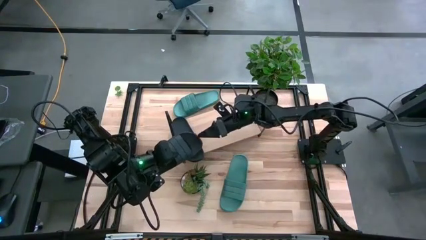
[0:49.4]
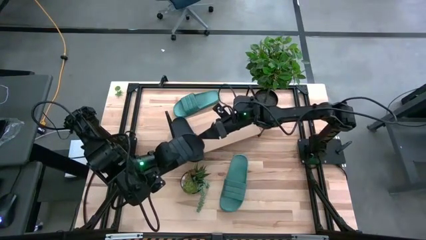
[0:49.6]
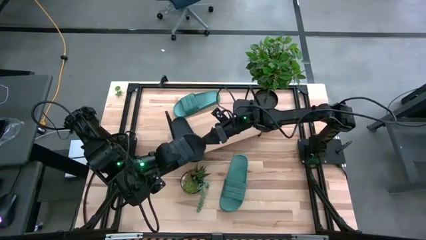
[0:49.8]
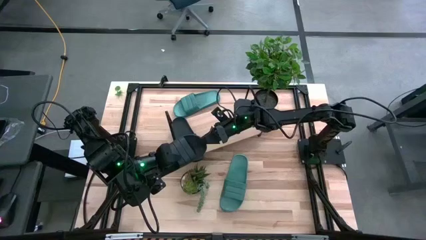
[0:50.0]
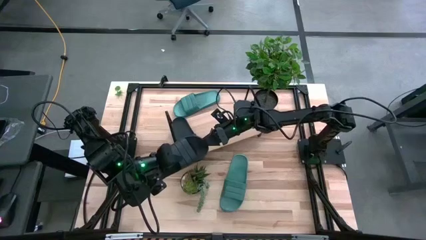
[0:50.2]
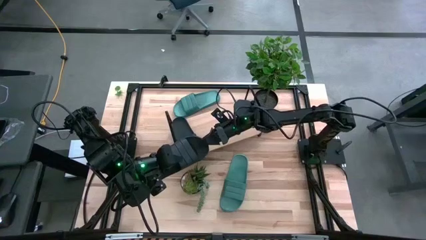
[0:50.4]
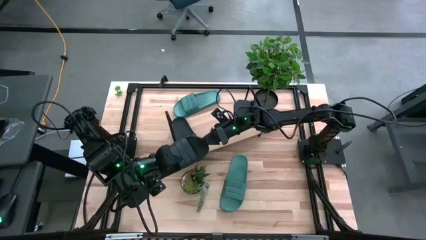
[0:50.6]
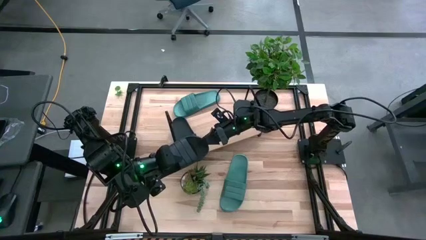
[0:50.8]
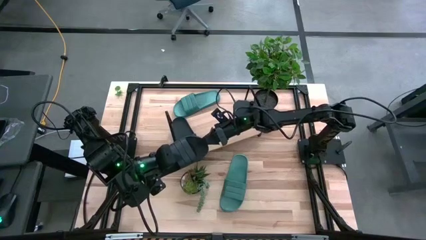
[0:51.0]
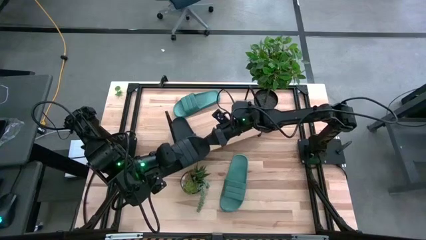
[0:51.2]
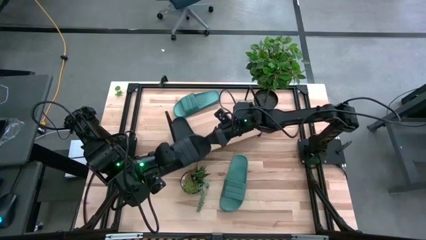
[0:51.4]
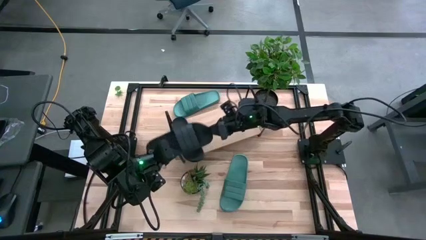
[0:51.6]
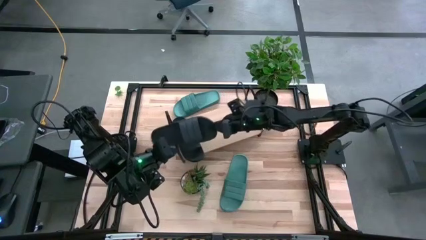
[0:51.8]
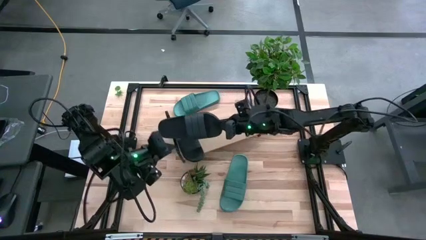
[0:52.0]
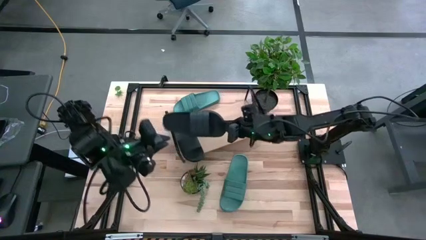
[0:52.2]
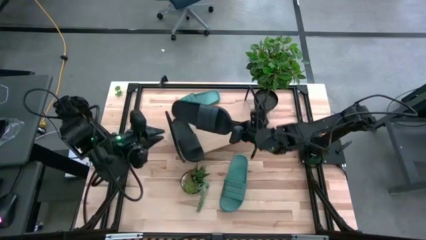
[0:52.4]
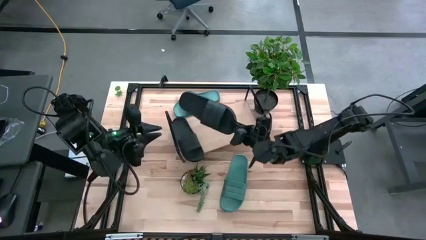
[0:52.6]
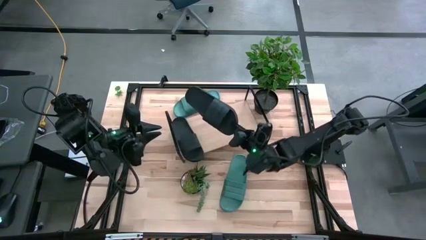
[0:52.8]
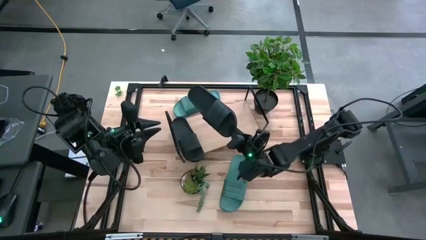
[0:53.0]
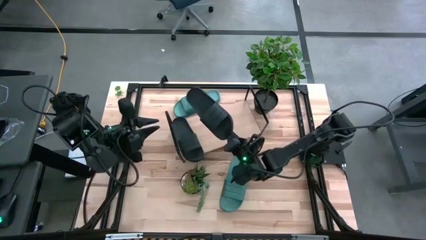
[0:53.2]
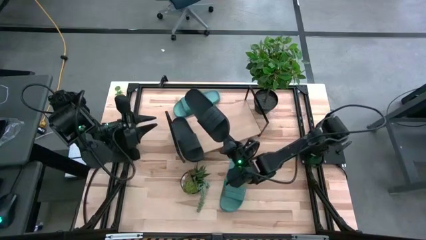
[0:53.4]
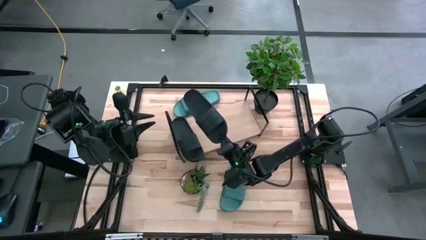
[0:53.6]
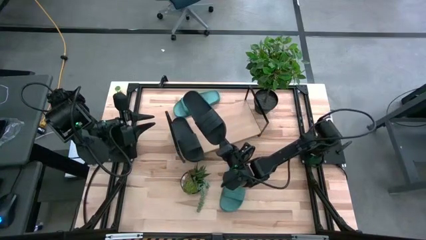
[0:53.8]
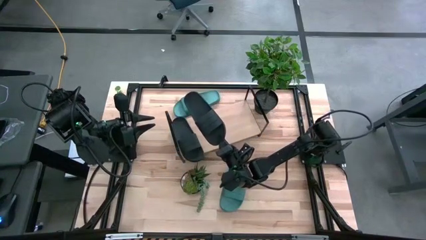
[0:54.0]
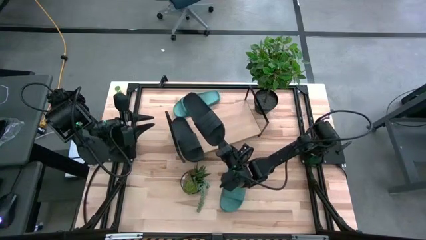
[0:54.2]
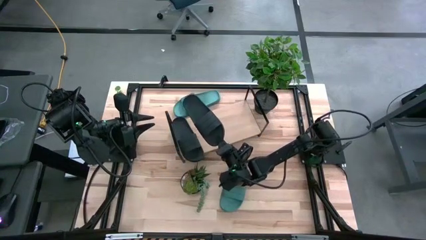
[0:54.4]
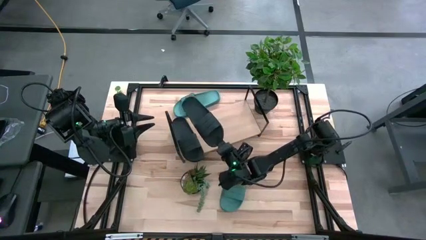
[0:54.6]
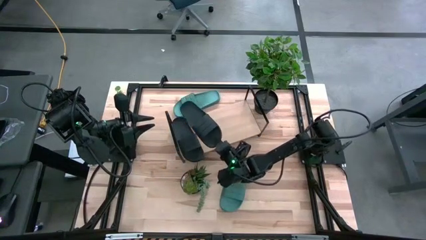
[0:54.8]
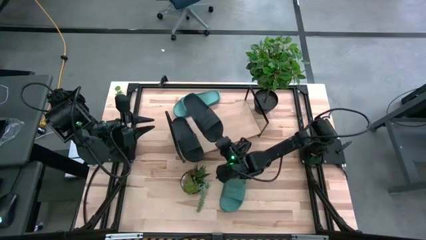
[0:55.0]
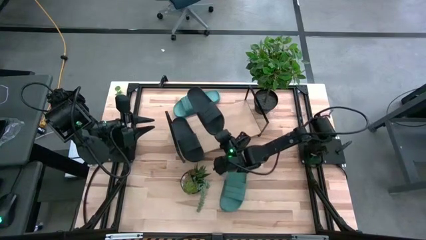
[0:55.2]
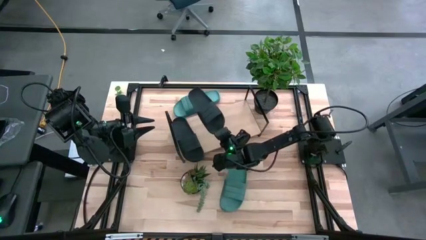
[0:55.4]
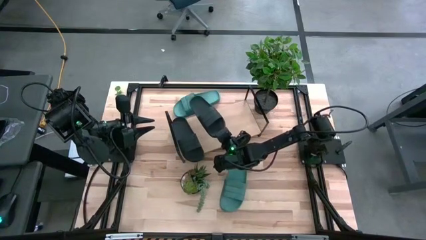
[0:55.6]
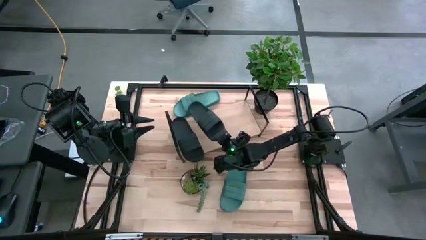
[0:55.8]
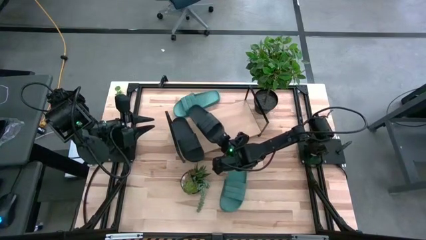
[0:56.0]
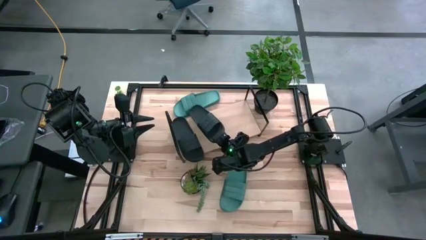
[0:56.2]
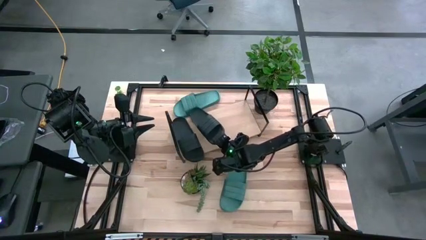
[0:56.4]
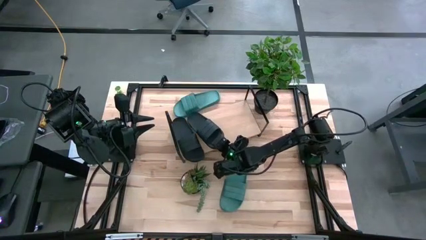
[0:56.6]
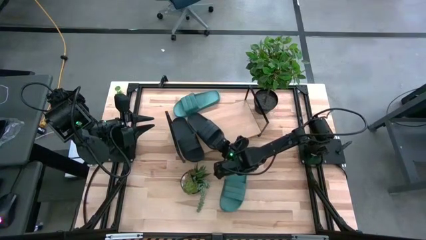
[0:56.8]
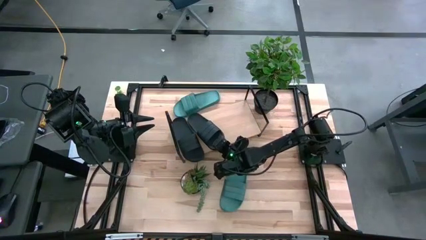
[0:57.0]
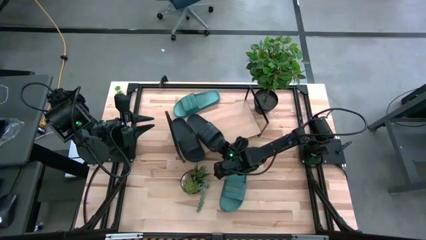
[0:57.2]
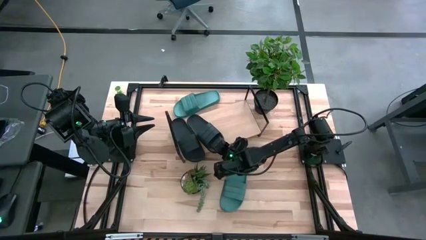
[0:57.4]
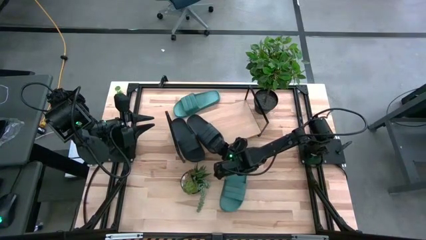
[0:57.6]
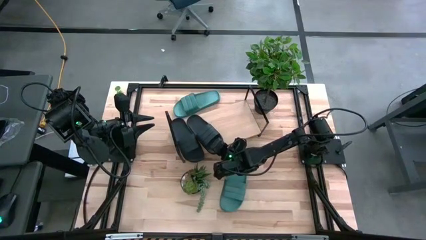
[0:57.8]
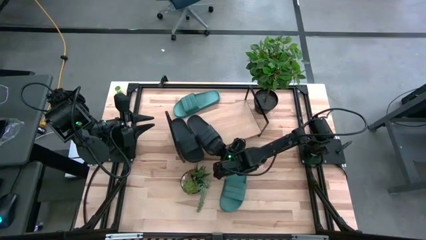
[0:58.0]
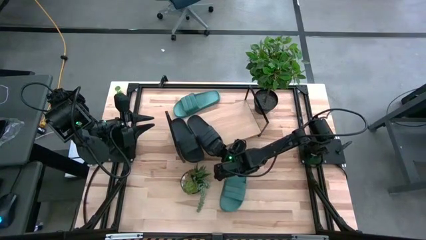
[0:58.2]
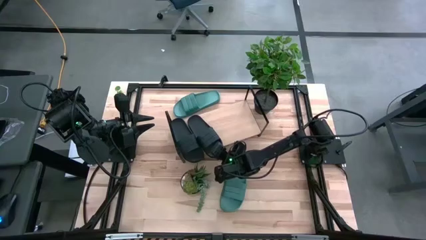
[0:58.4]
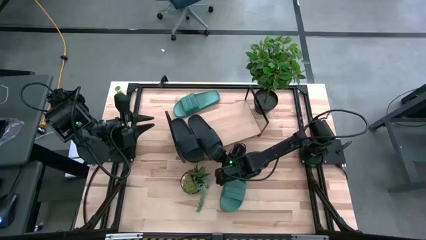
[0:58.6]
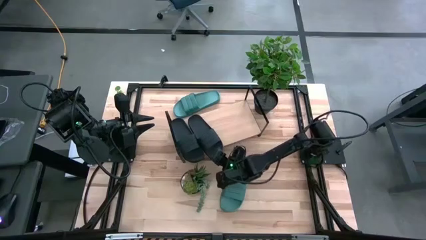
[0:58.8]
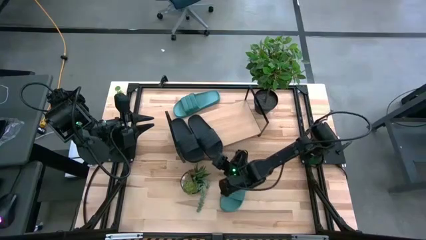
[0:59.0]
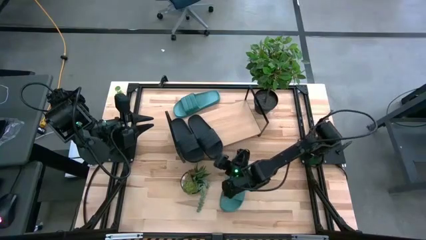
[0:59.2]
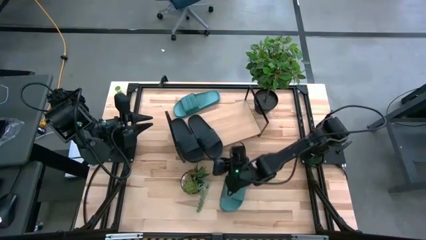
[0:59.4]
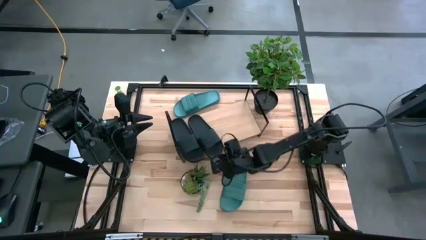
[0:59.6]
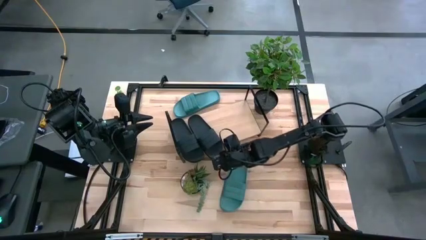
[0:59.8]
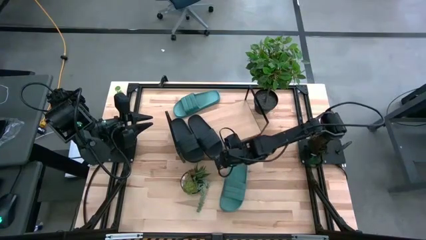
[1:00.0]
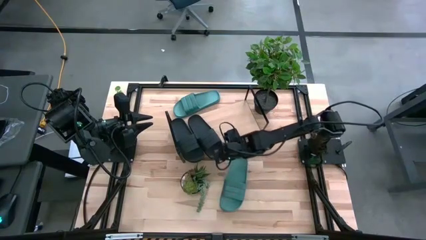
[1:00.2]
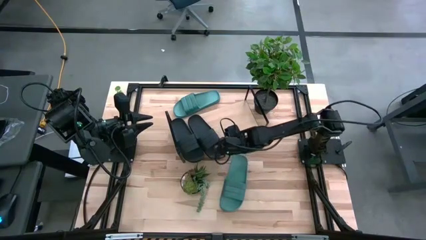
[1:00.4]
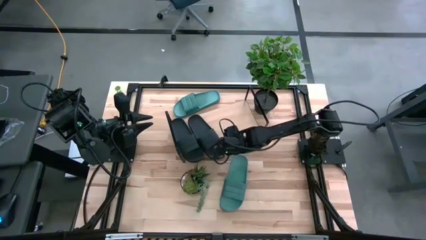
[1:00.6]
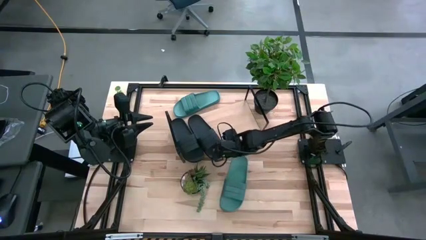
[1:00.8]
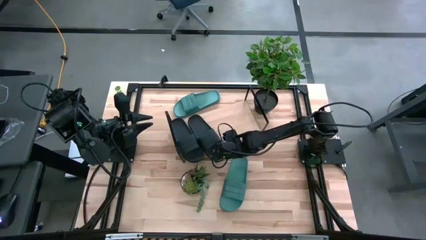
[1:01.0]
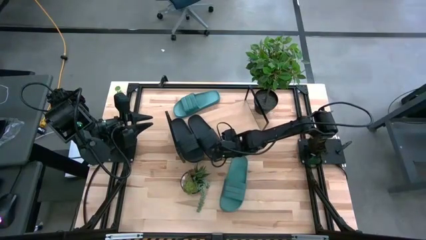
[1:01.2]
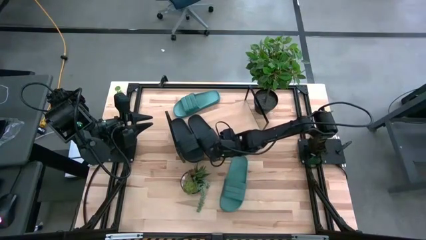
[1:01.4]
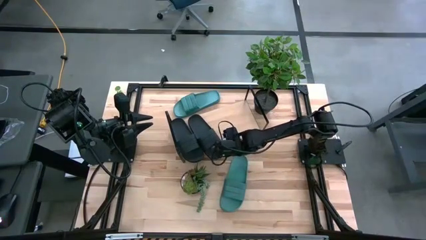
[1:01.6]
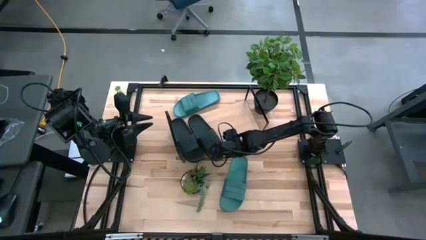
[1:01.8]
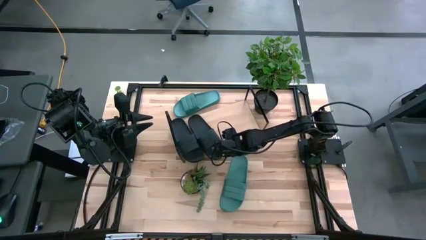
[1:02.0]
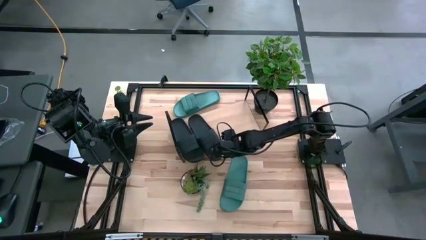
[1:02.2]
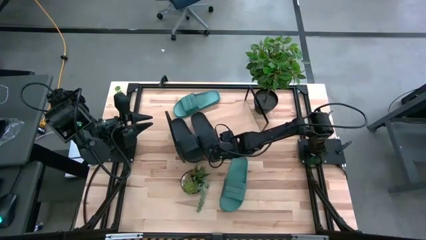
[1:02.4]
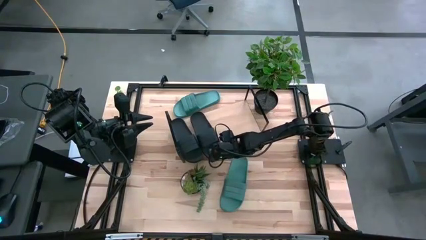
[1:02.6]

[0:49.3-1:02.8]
Task: Pick and place slides into the shelf
Put the black slipper on the shelf

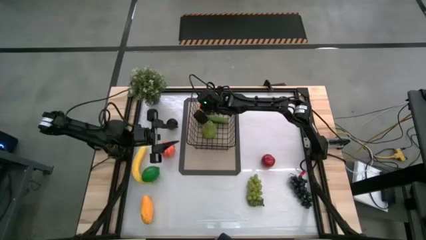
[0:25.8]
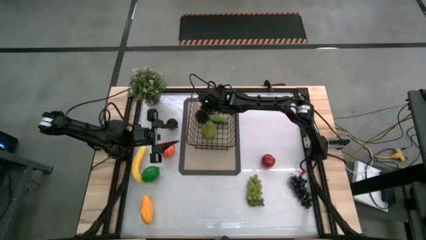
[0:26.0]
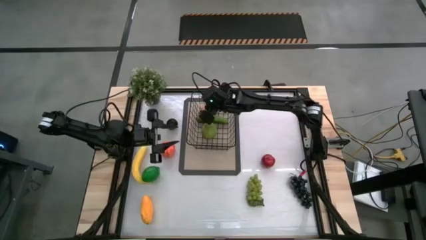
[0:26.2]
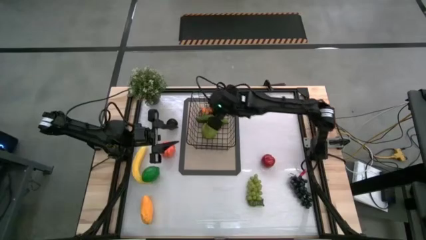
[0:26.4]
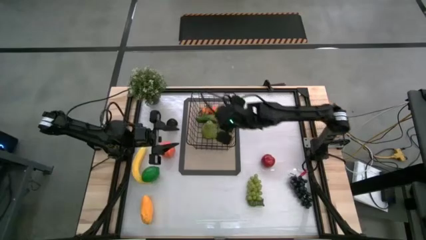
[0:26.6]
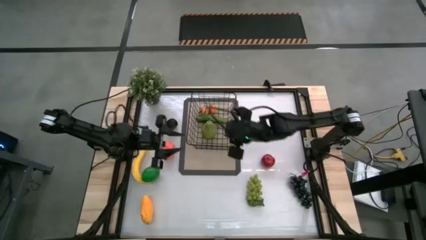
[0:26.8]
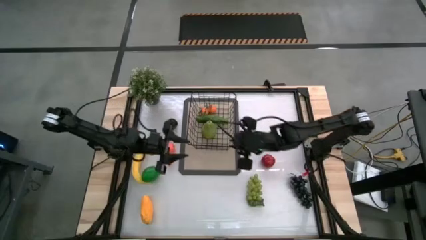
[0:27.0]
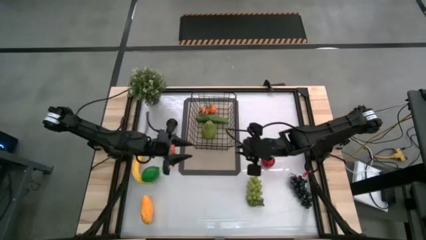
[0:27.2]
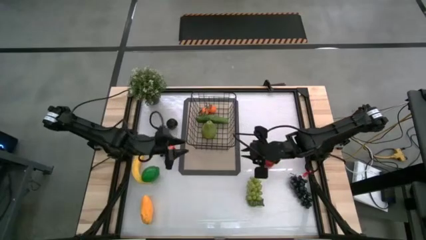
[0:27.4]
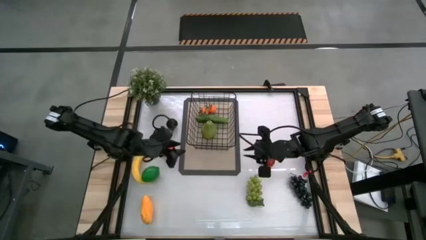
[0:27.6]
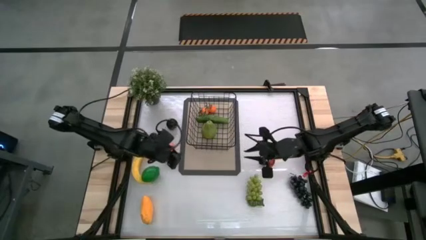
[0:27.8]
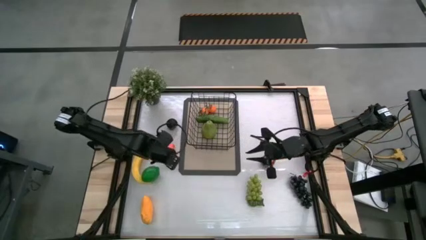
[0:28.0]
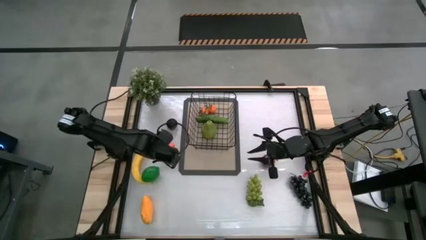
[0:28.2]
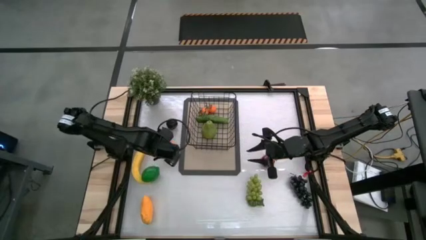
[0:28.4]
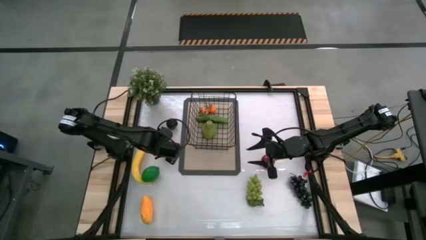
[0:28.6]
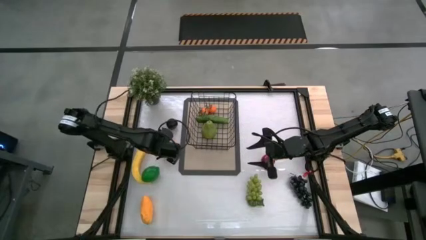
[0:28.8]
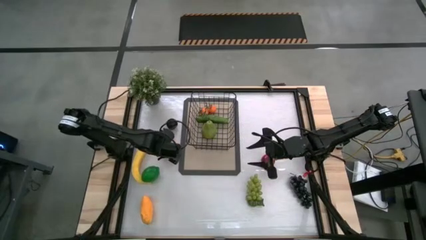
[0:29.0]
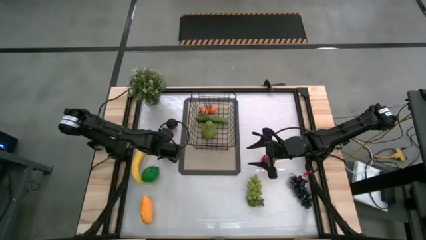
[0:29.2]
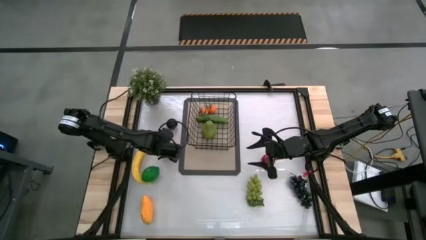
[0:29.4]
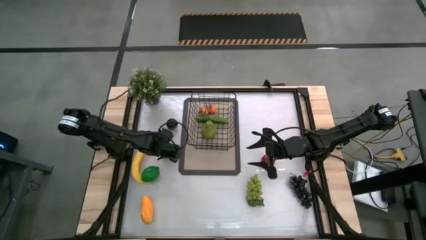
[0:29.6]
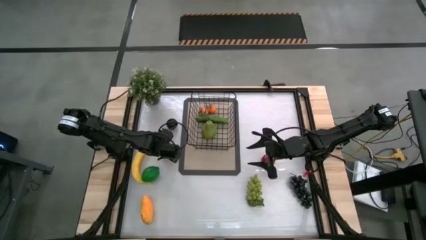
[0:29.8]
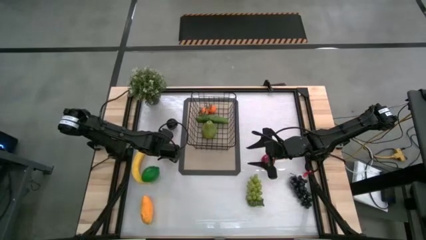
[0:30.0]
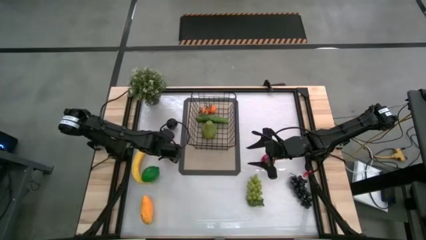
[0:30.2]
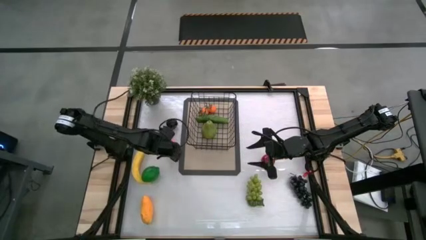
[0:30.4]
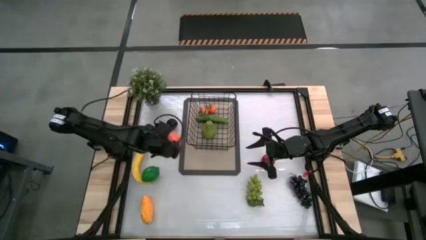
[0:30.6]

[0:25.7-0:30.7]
Task: Build produce basket
Put the pumpkin into the black wire basket
